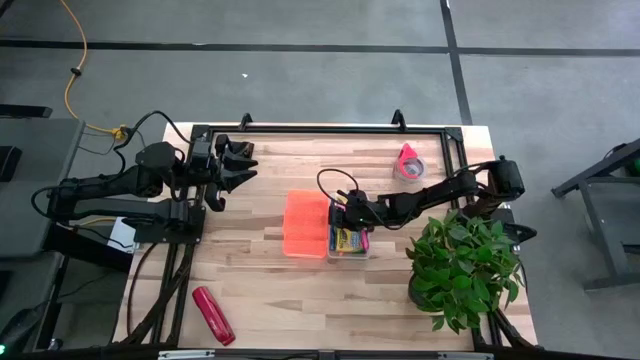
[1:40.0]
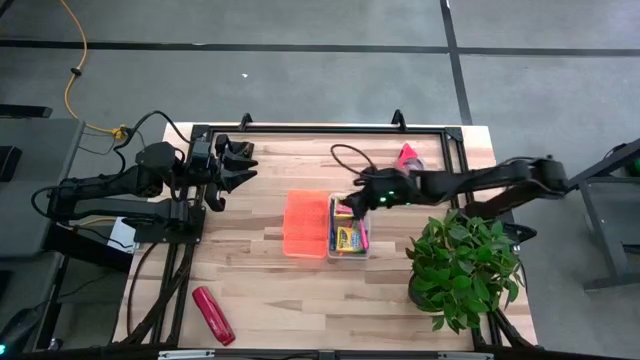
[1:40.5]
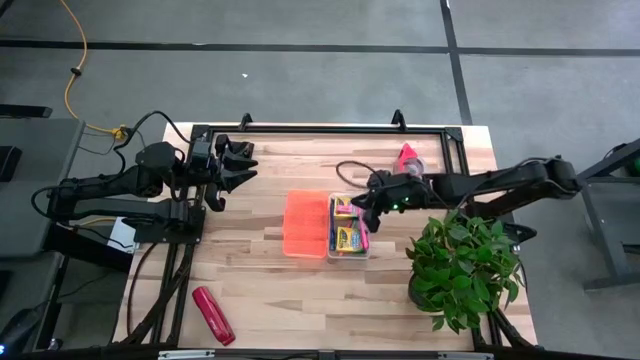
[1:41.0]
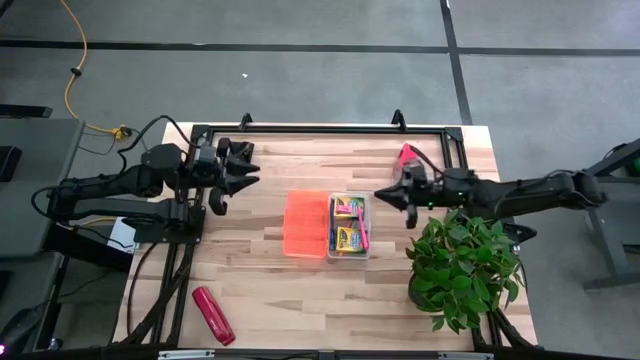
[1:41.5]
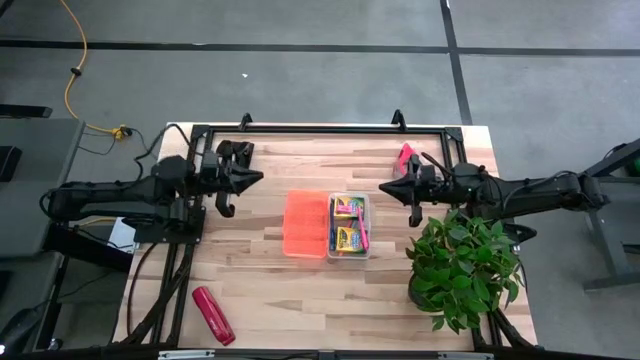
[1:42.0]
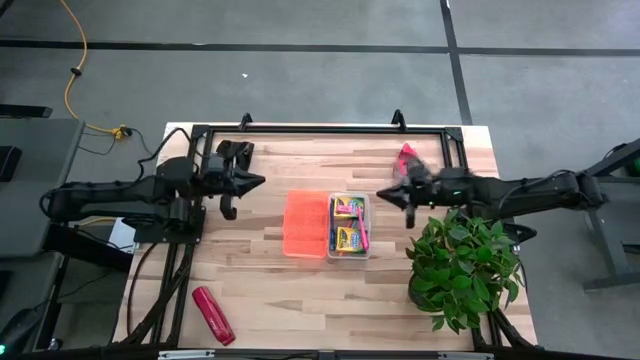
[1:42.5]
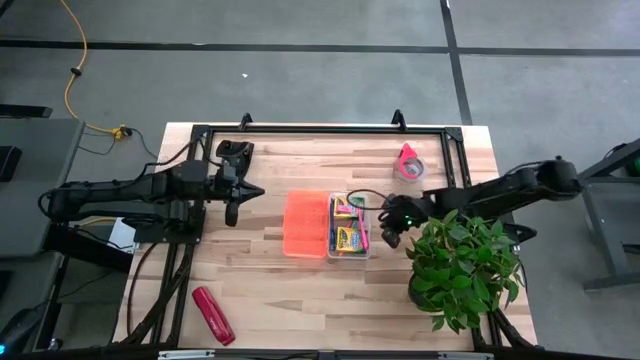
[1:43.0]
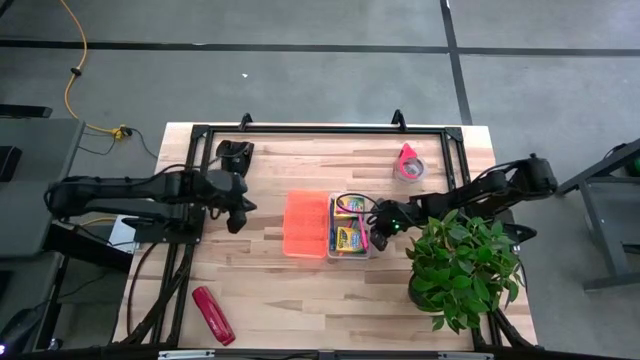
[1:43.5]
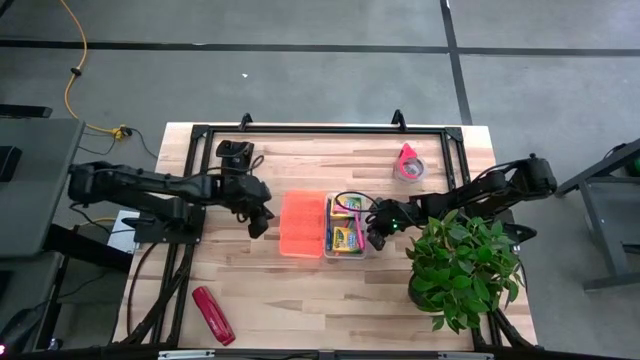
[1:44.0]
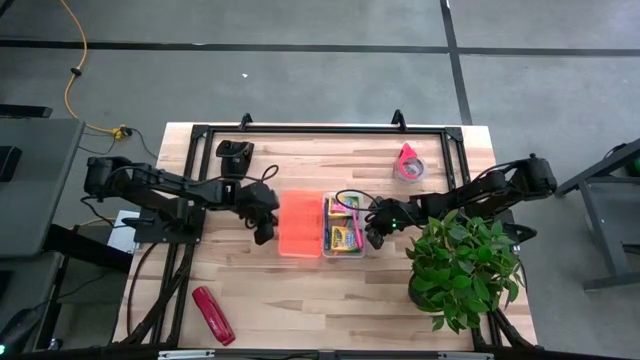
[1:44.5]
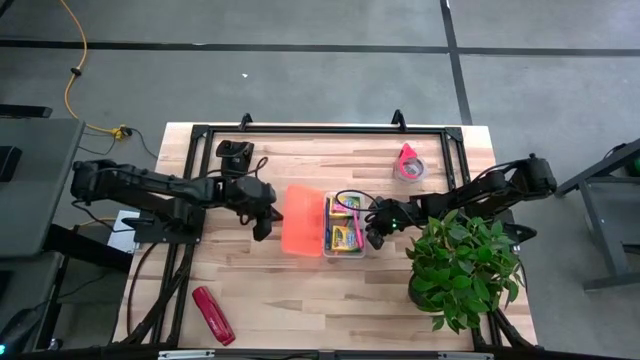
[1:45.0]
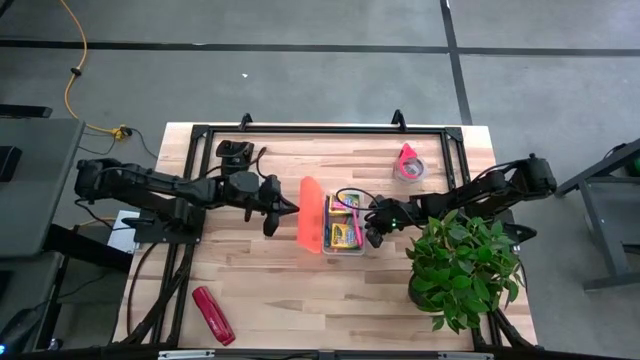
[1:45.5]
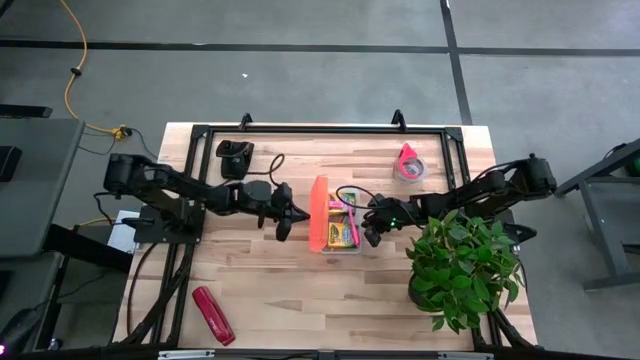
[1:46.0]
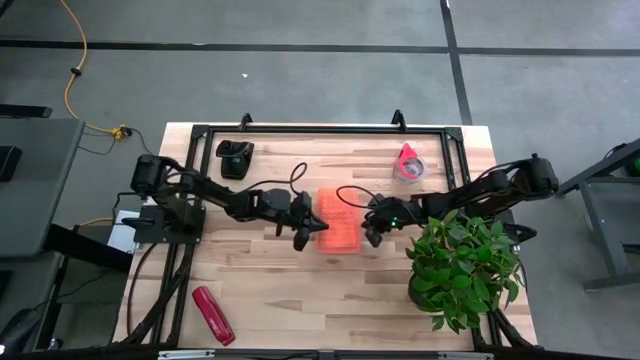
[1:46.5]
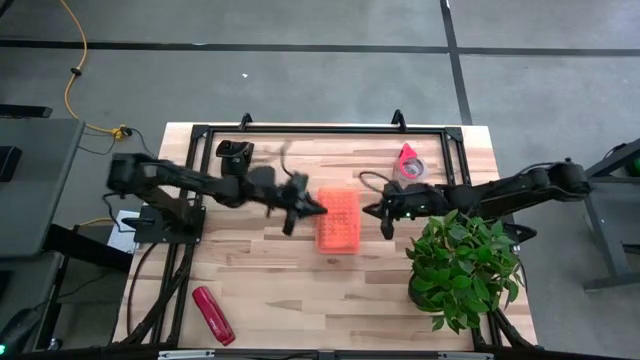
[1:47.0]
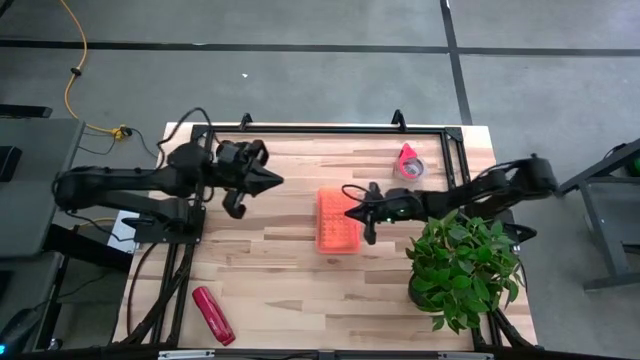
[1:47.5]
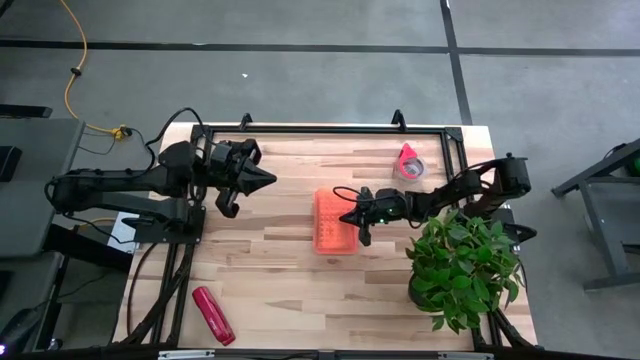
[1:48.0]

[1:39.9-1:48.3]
Task: Pack school essentials
Close the supply box

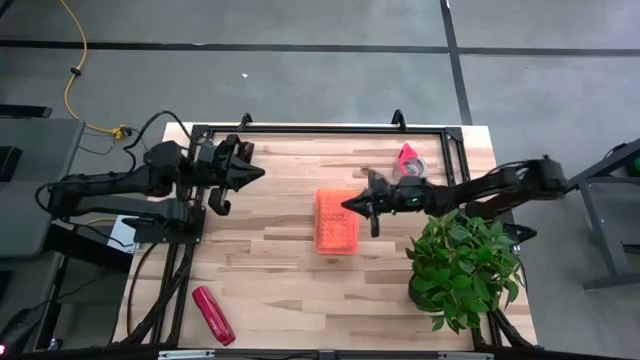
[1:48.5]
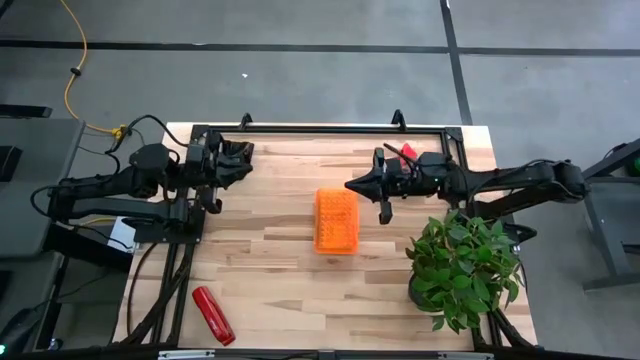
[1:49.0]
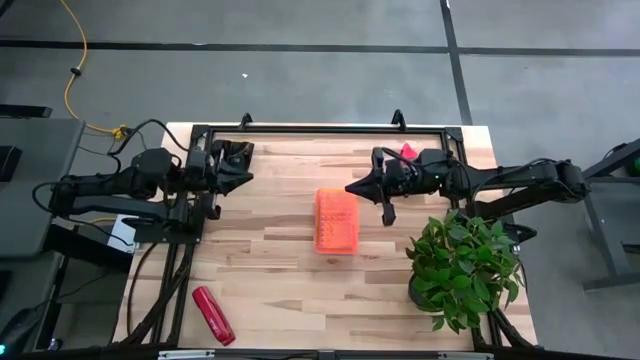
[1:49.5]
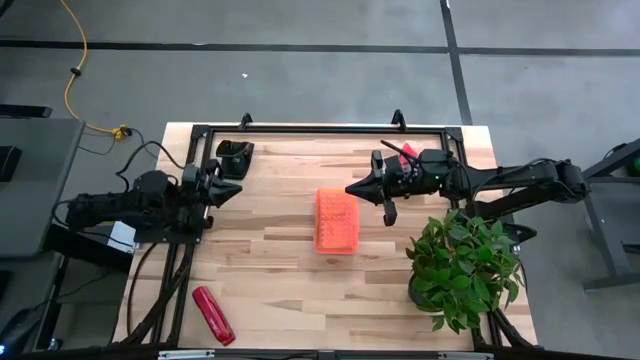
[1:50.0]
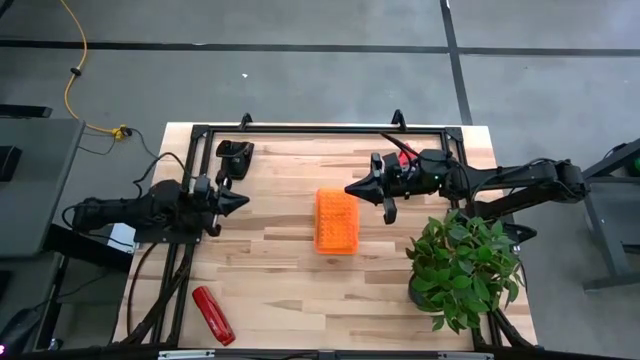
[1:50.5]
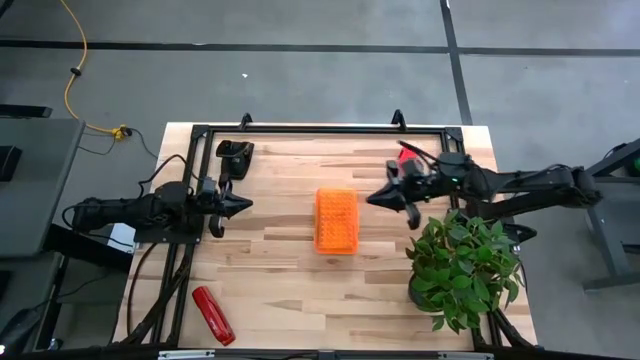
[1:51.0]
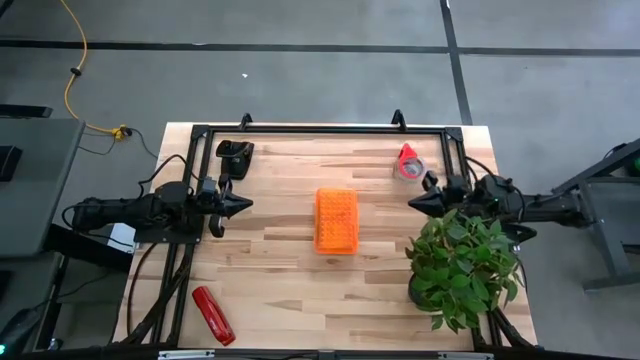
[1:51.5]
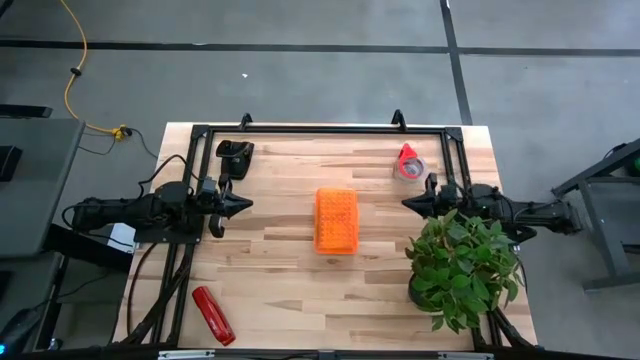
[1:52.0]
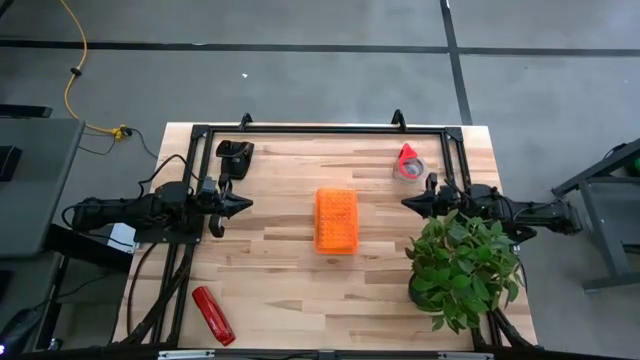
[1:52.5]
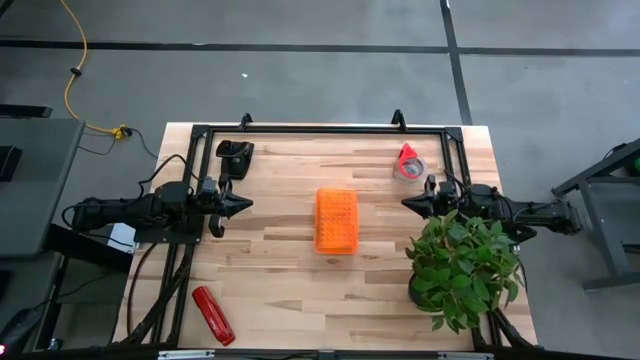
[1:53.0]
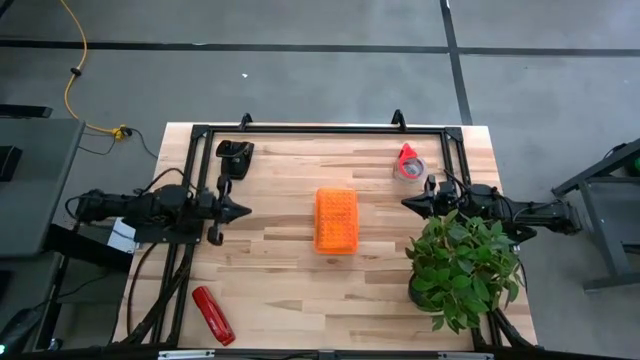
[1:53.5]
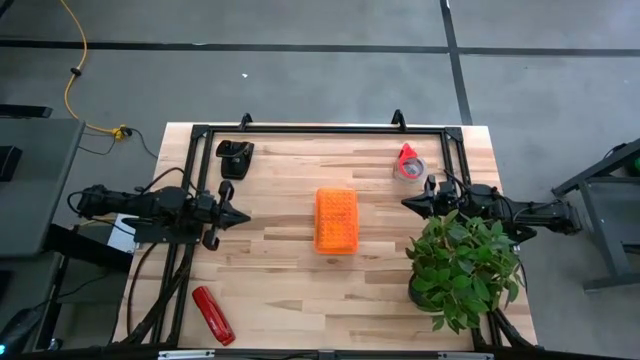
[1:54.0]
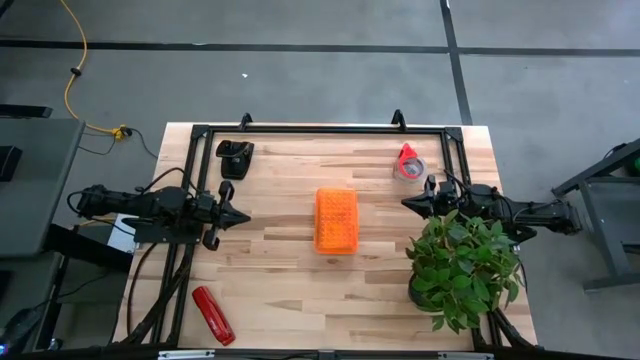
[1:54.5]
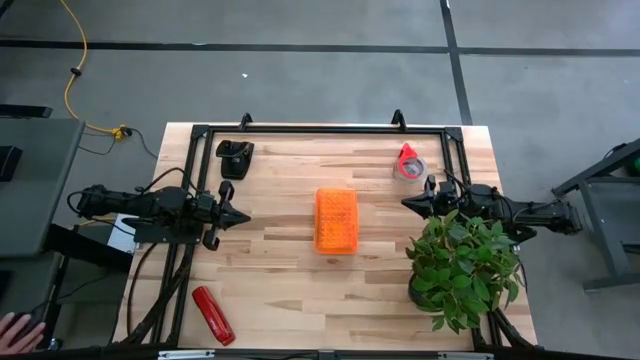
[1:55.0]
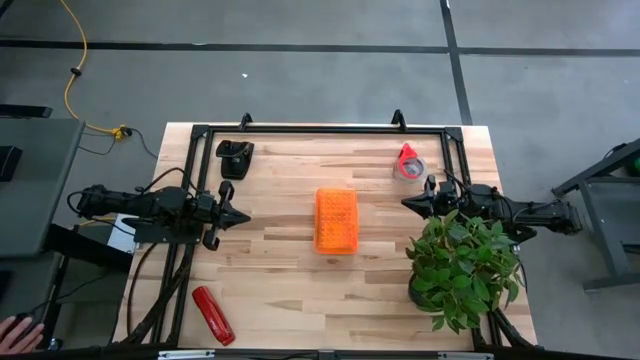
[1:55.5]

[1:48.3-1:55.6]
Return to Home Position

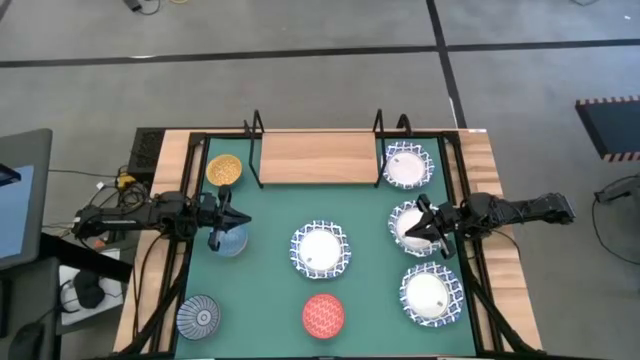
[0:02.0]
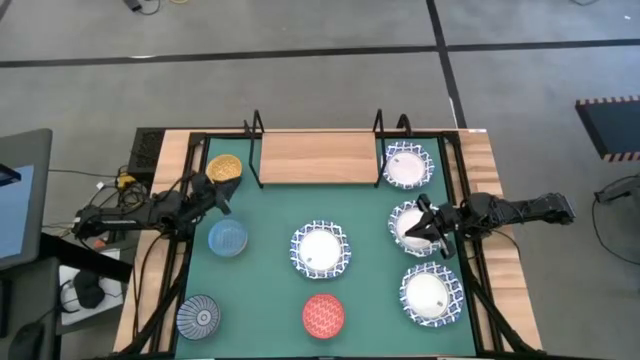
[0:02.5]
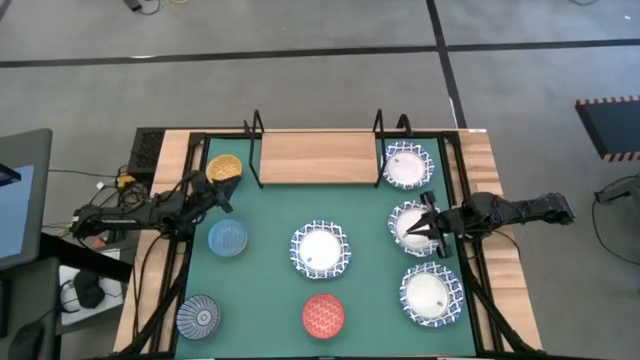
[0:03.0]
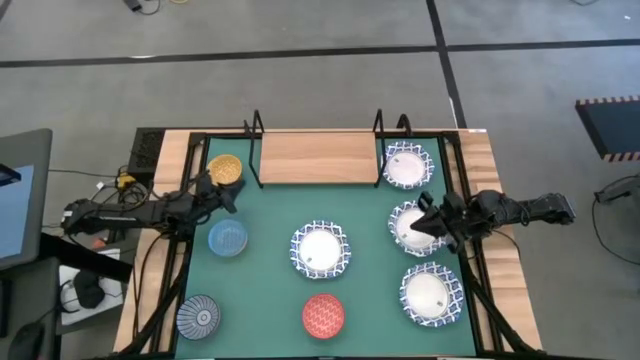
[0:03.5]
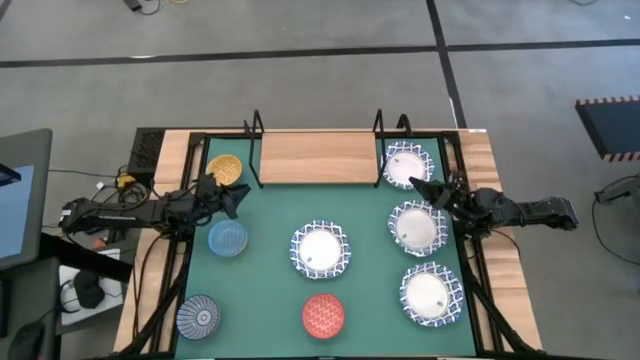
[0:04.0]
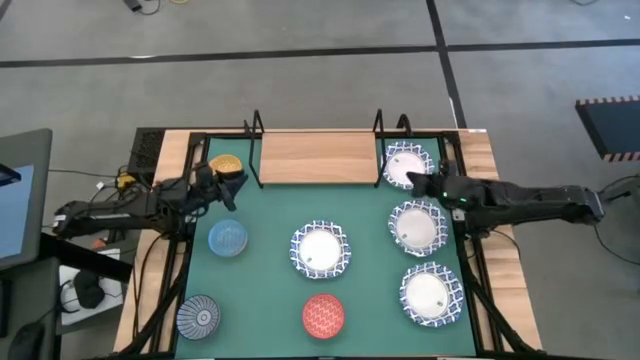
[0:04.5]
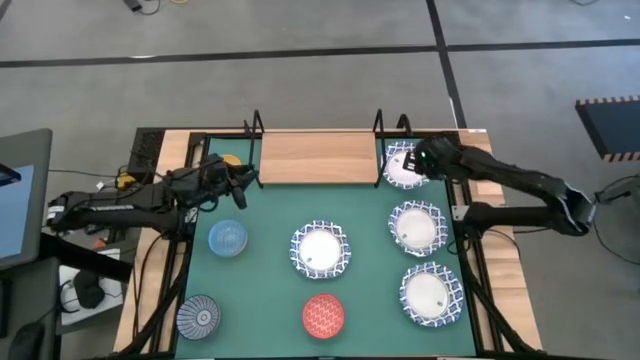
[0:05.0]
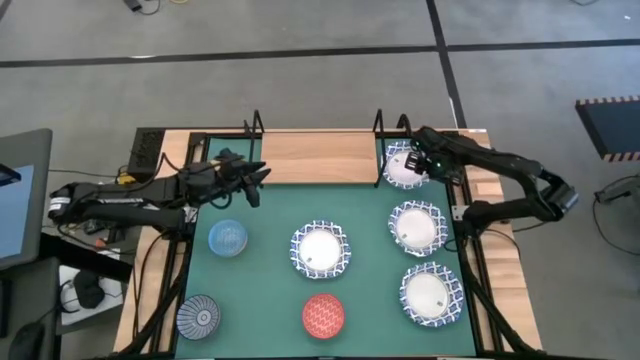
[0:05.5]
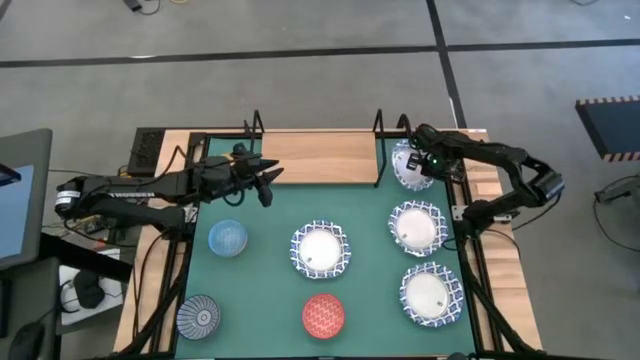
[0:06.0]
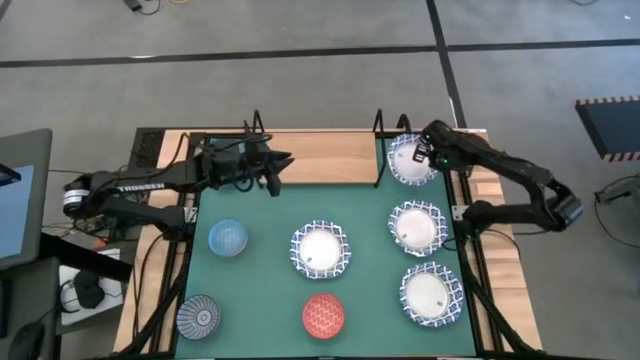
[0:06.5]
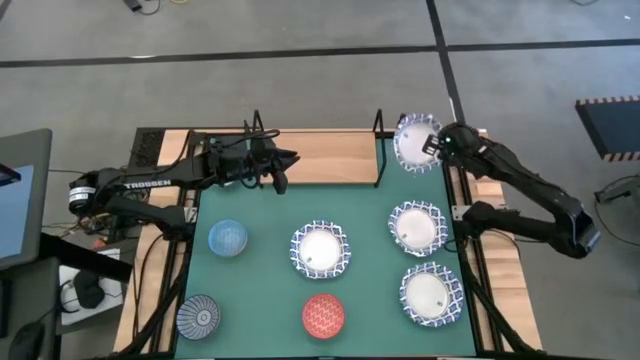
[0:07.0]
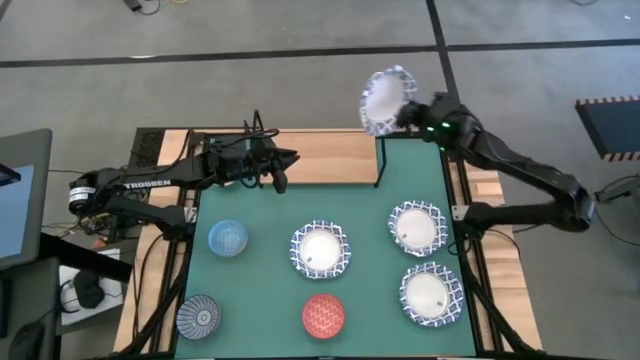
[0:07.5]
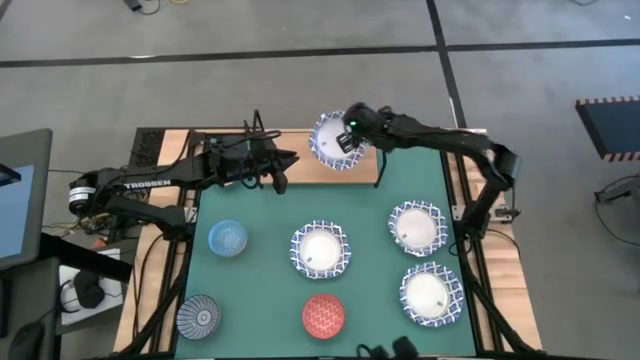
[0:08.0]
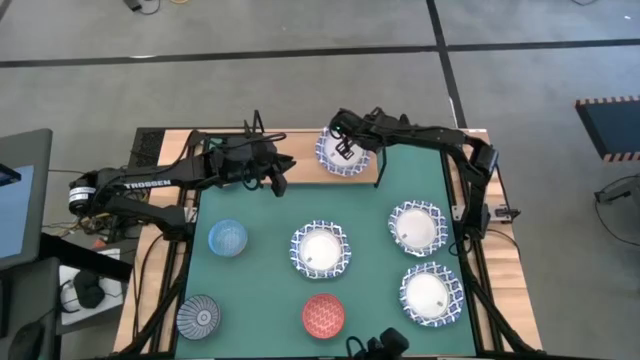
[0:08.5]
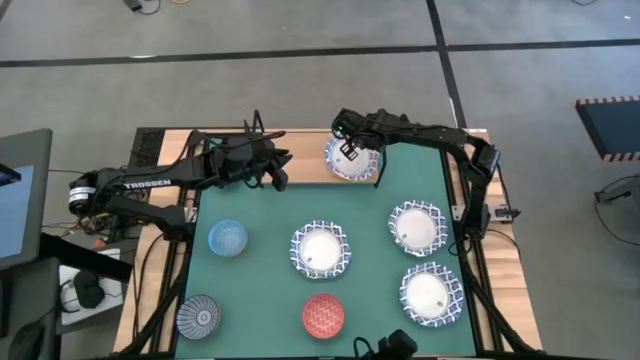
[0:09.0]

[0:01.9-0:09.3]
Task: Place and stack bowls onto a shelf
Put the white bowl on the shelf
